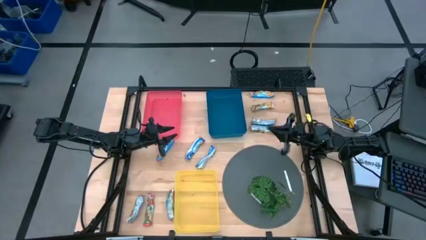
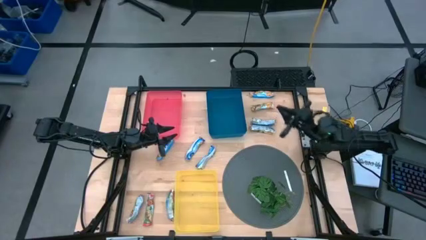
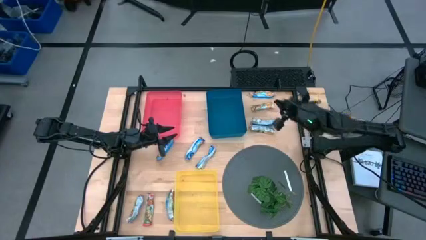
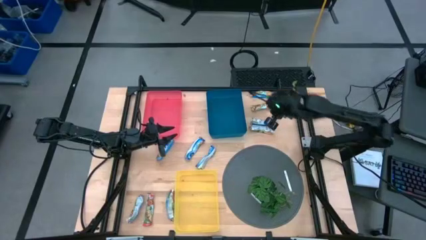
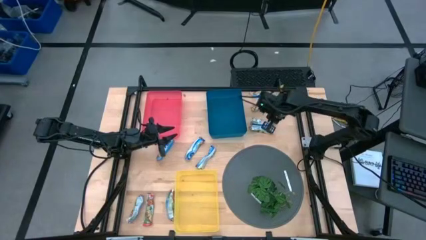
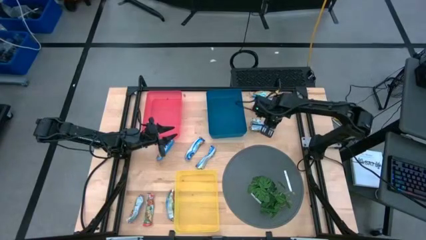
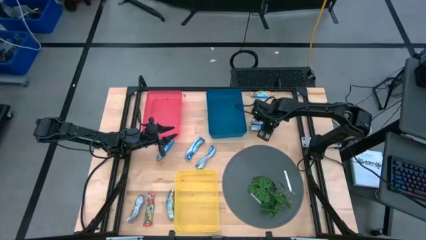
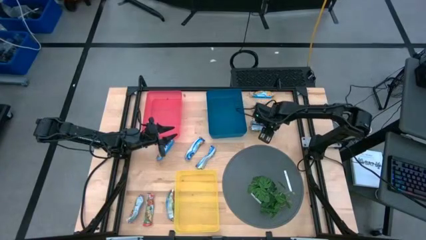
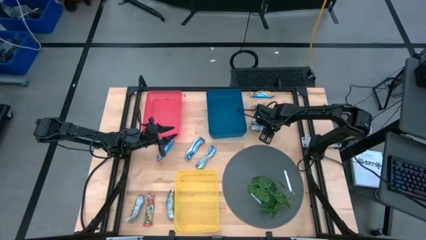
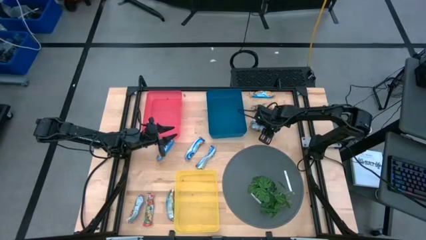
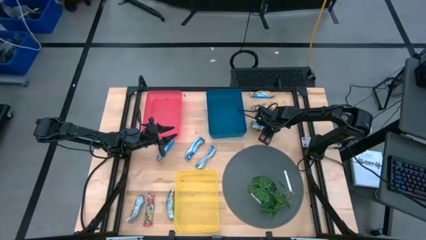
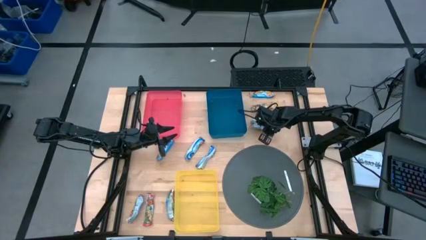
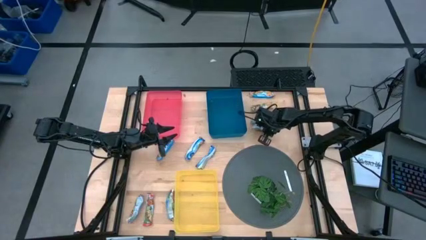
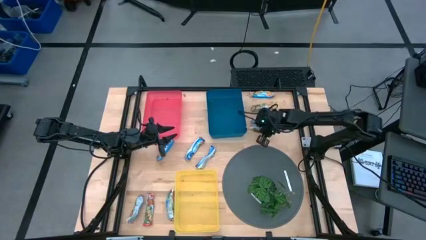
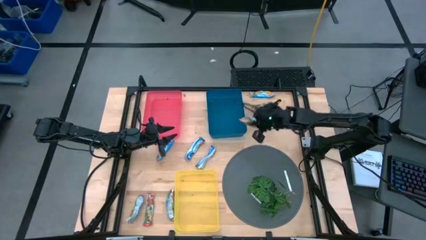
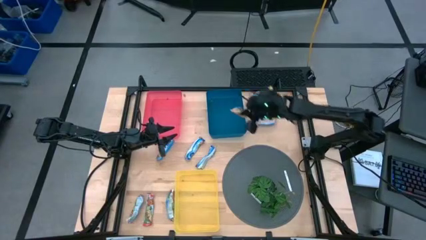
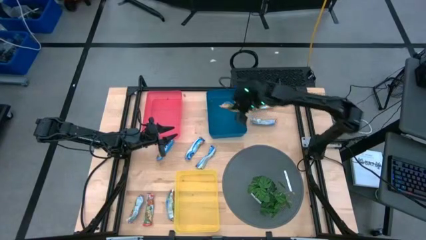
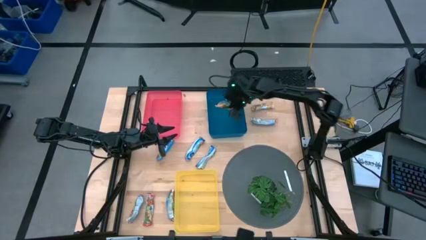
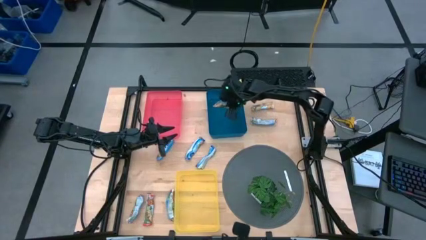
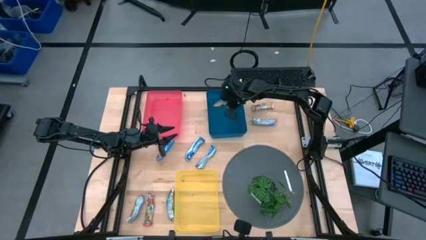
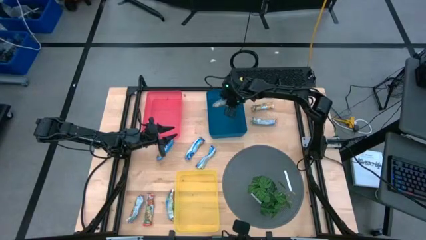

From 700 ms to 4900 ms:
Task: Pick and place Granola Bars by type
Put the yellow granola bar into the blue bin

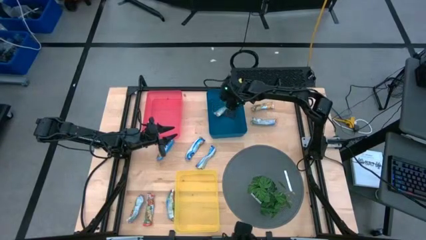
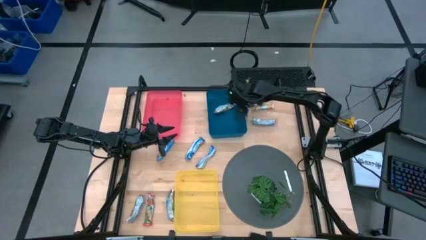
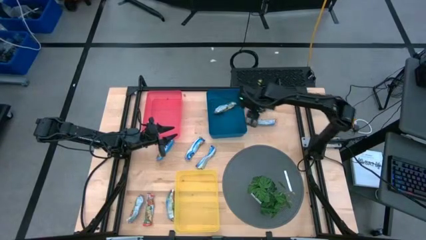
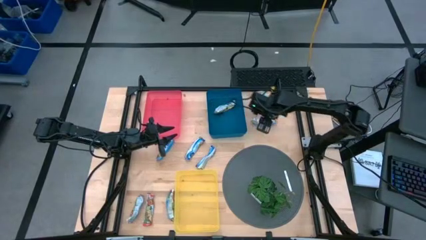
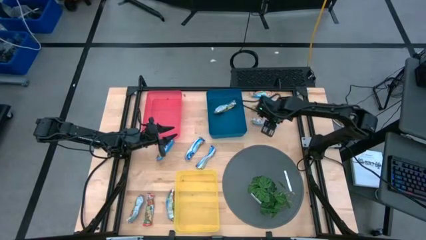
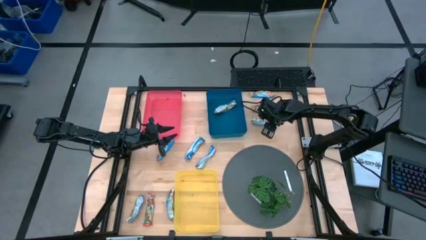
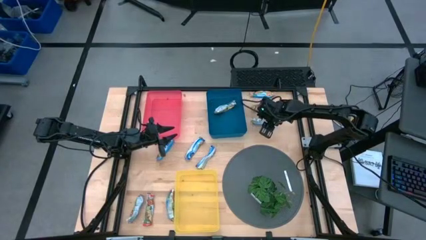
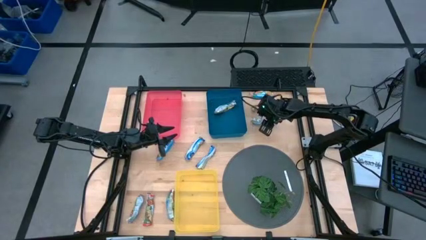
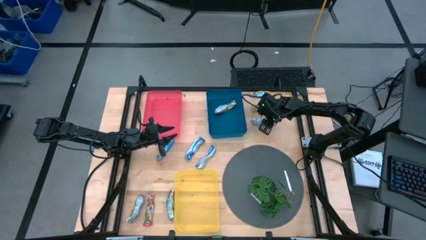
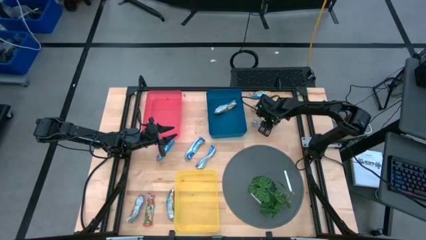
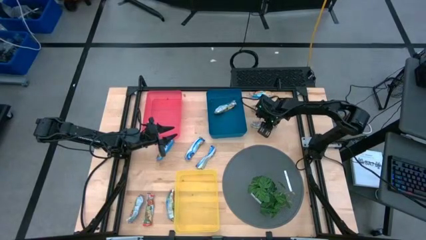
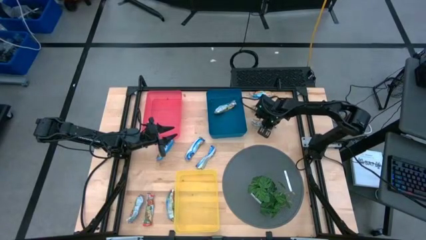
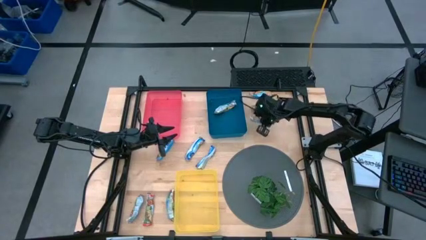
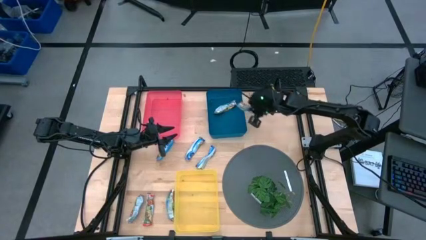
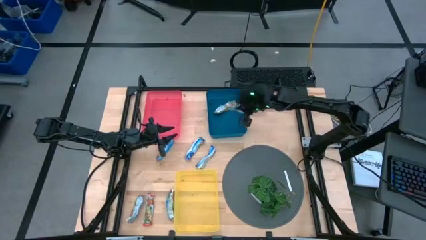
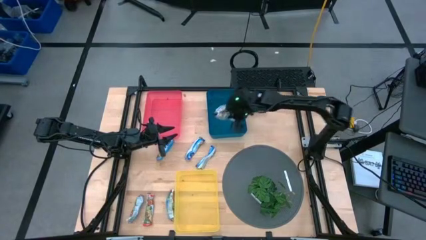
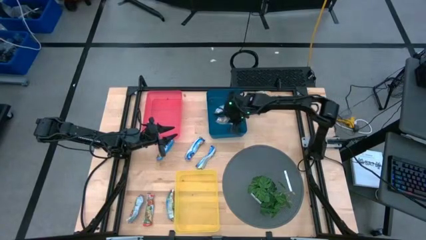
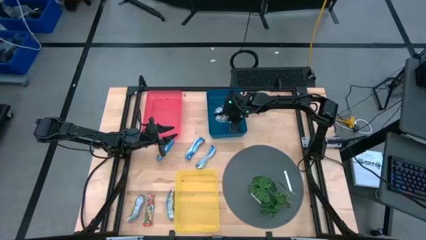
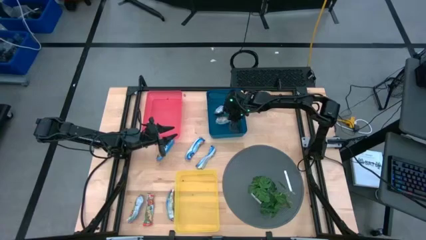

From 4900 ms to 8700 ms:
Put the bottom yellow granola bar into the blue bin

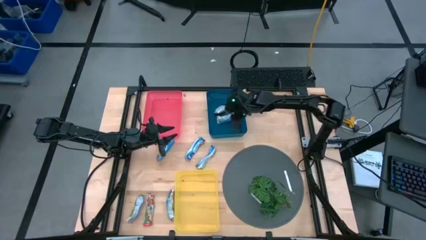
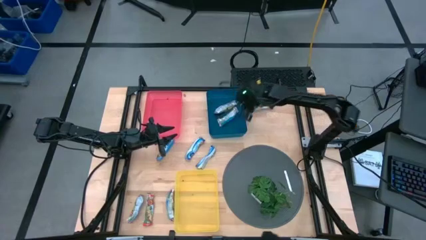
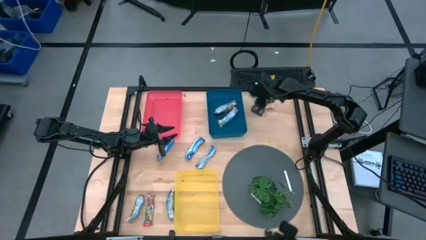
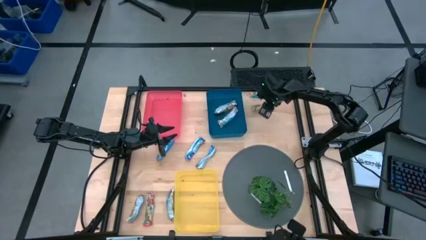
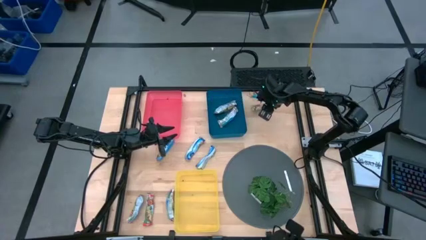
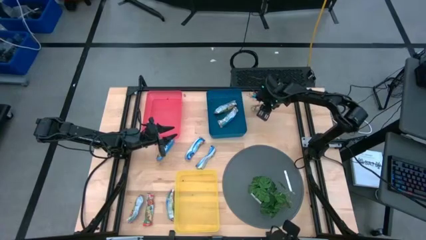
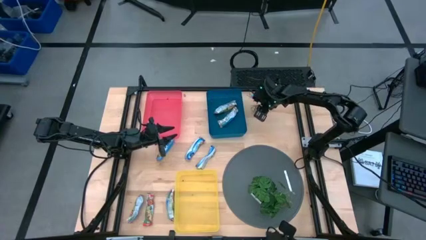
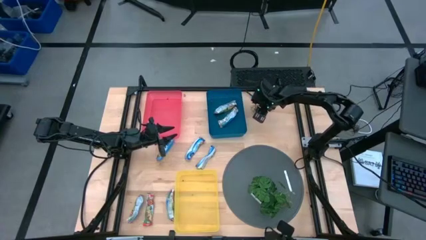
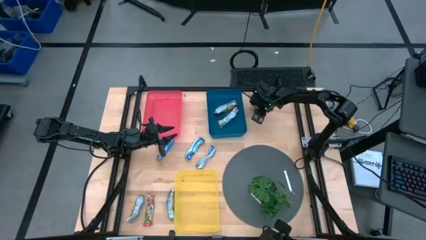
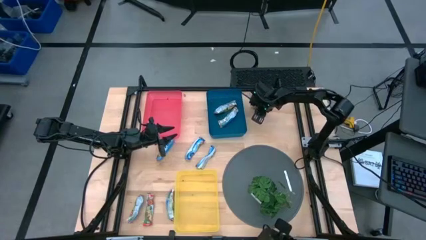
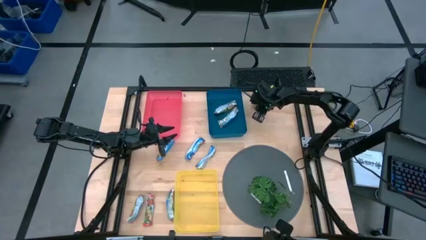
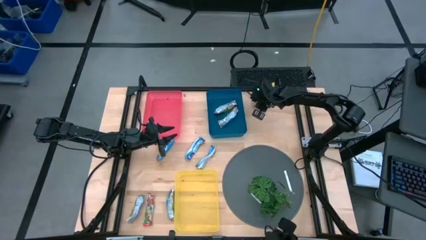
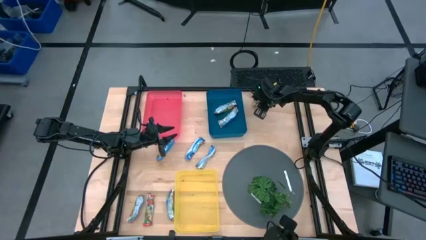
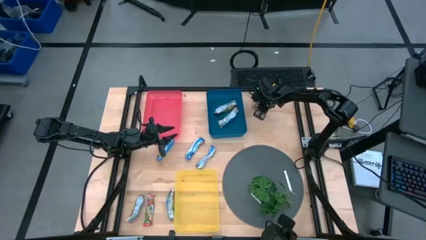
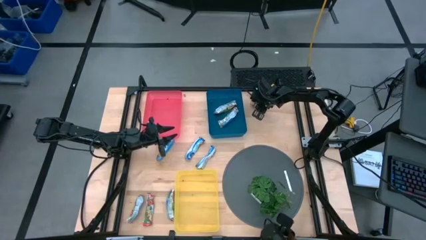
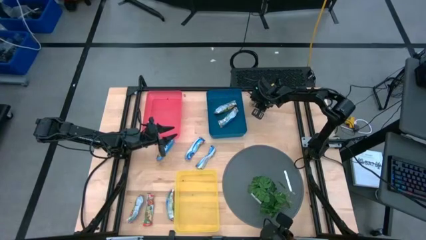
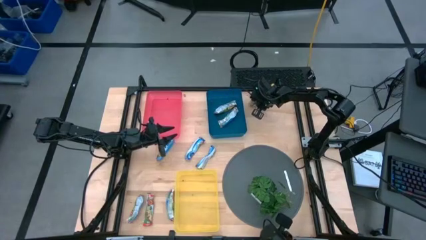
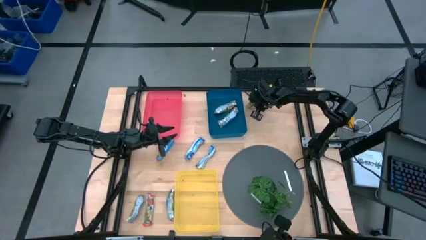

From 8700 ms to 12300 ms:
Put the bottom yellow granola bar into the blue bin

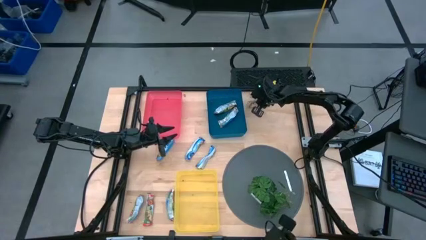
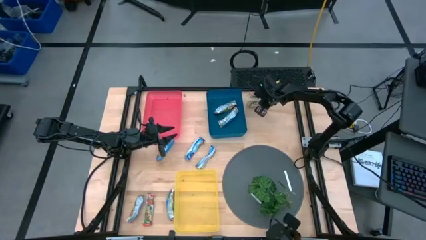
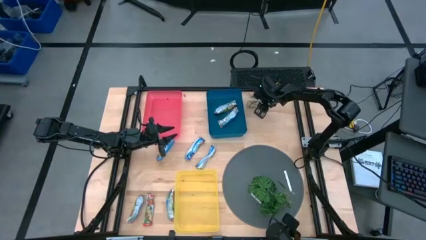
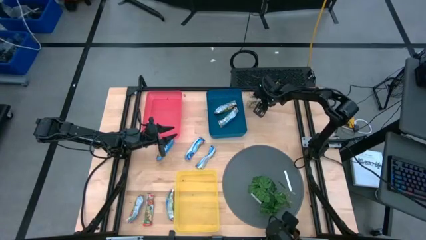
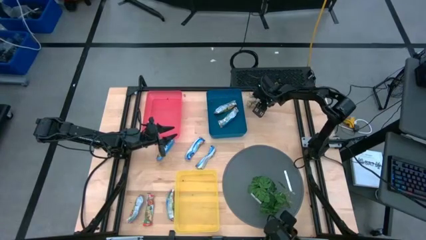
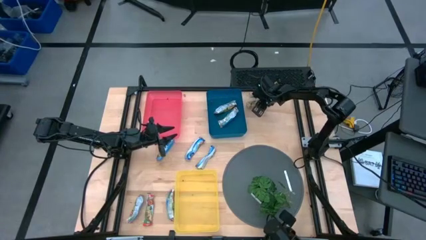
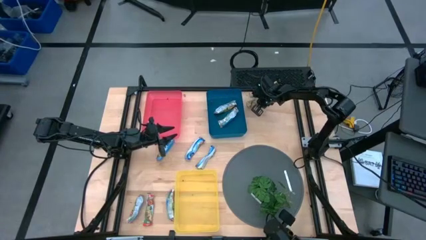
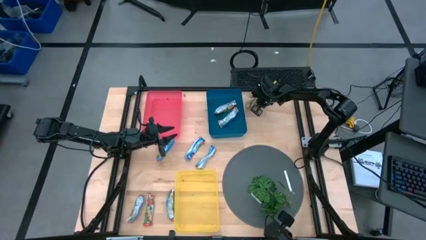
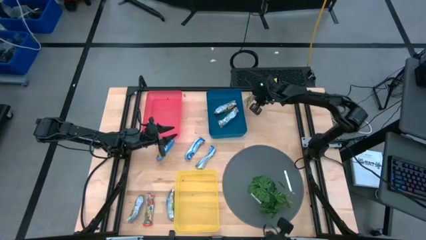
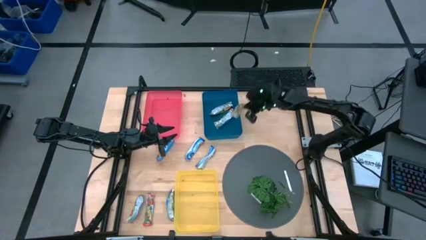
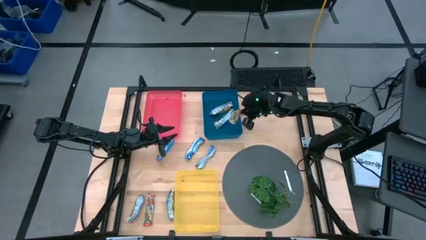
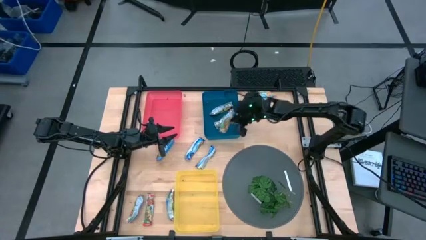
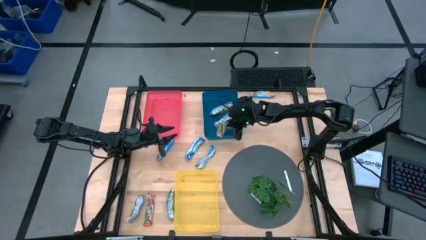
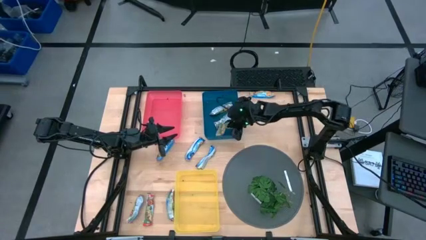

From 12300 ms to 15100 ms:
Put the bottom yellow granola bar into the blue bin

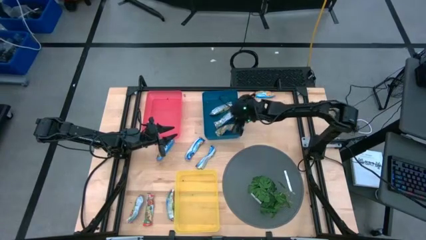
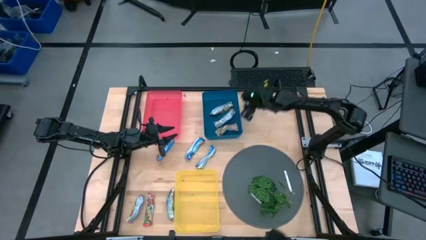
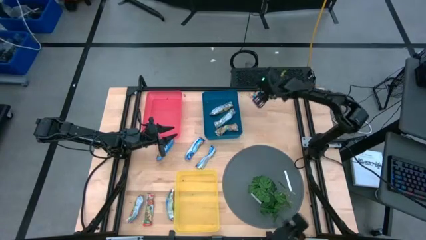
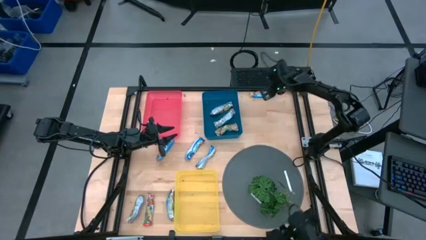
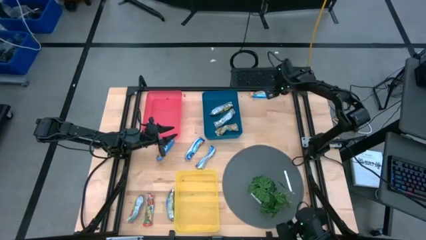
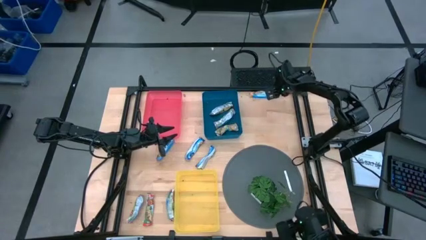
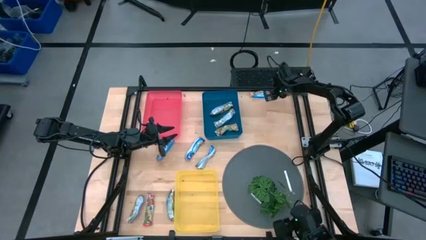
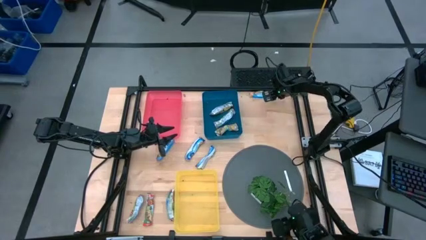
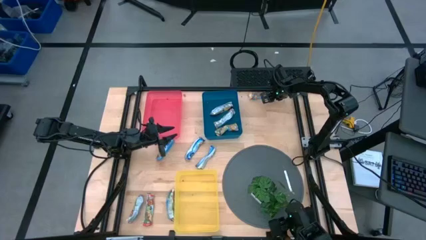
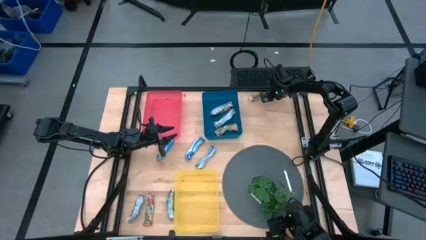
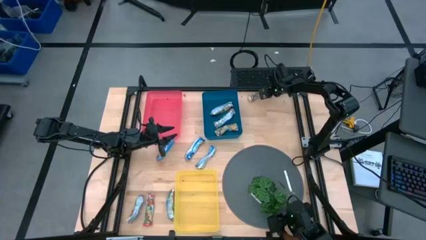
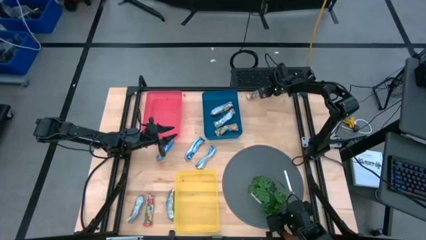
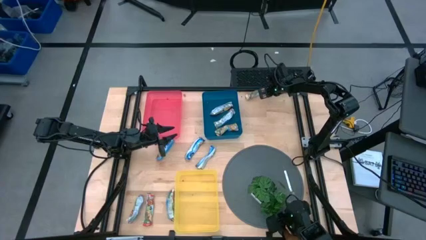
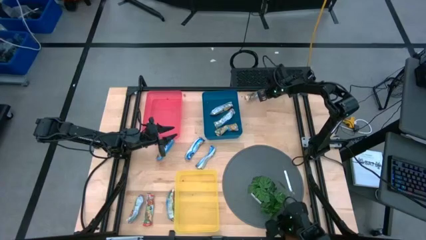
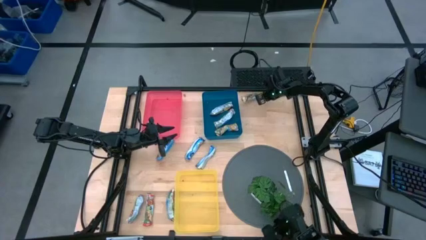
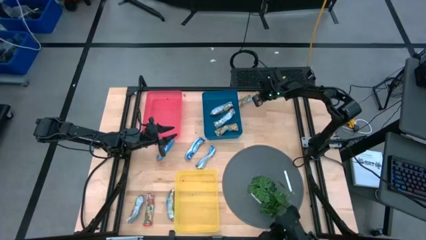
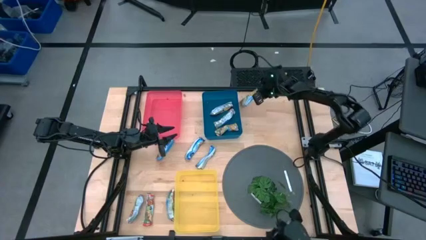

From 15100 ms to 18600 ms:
Put the yellow granola bar into the blue bin
